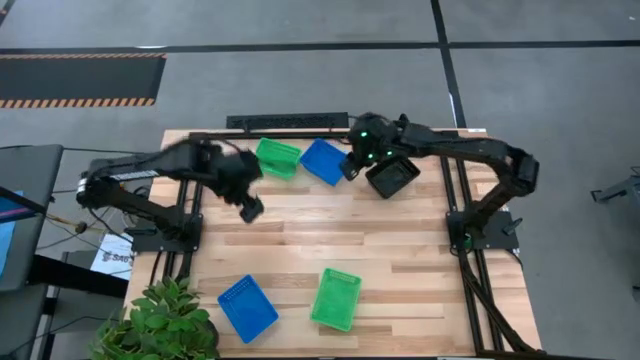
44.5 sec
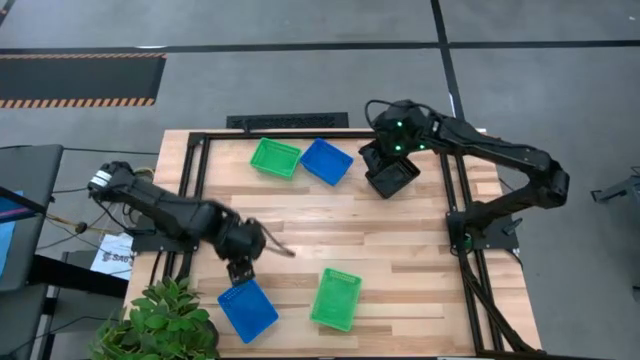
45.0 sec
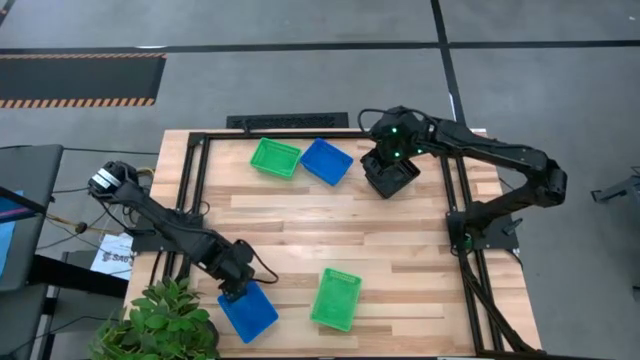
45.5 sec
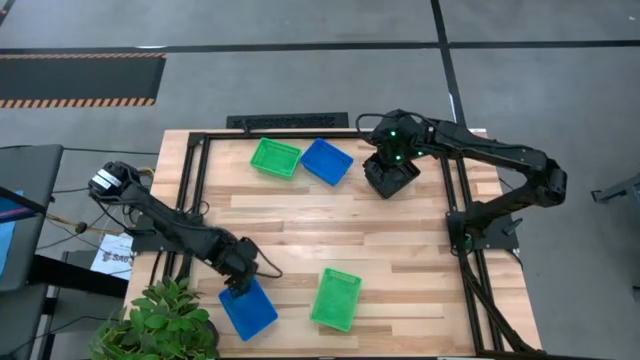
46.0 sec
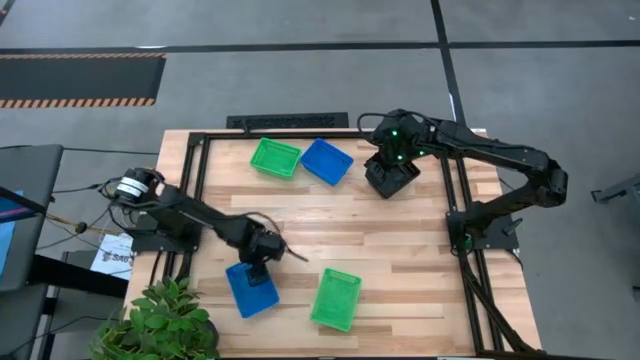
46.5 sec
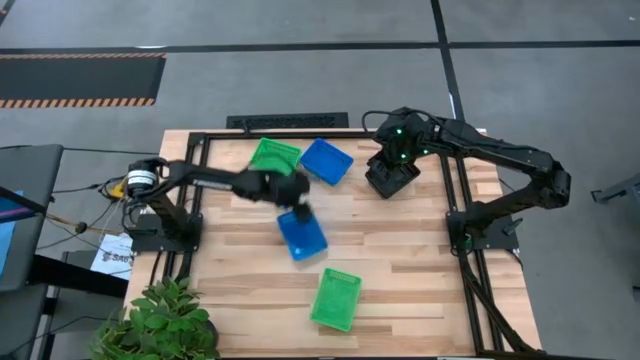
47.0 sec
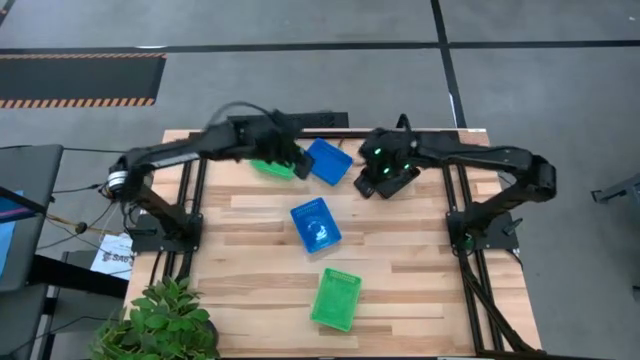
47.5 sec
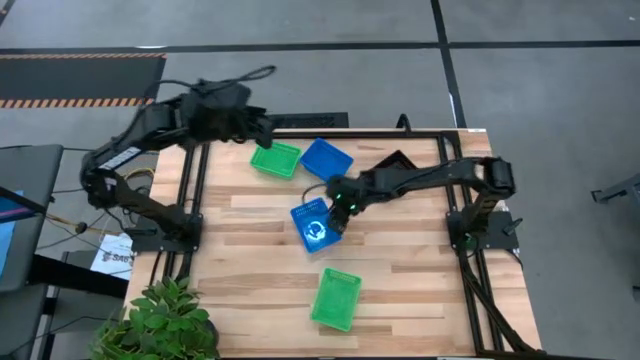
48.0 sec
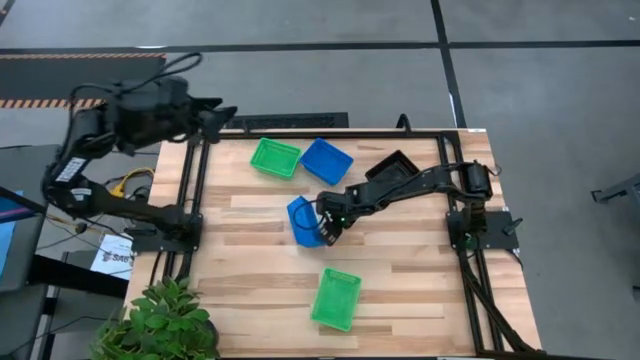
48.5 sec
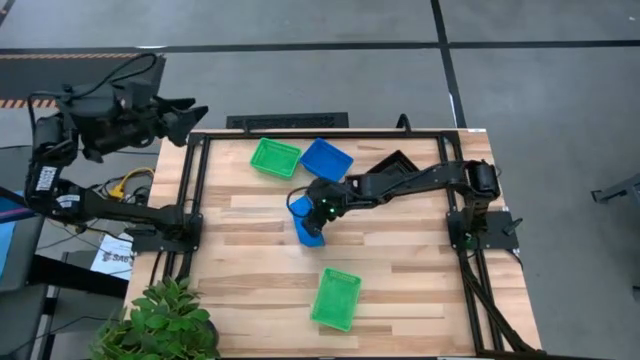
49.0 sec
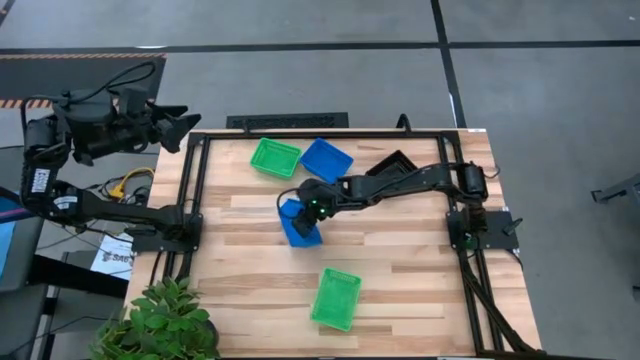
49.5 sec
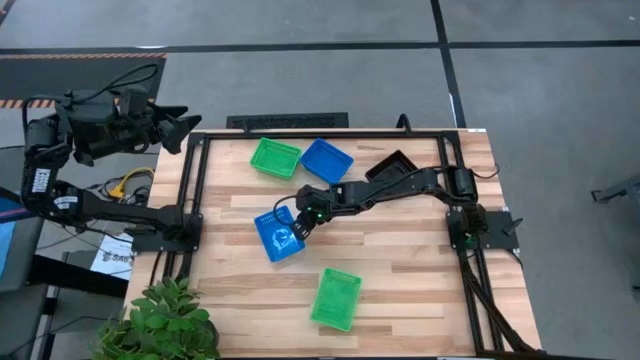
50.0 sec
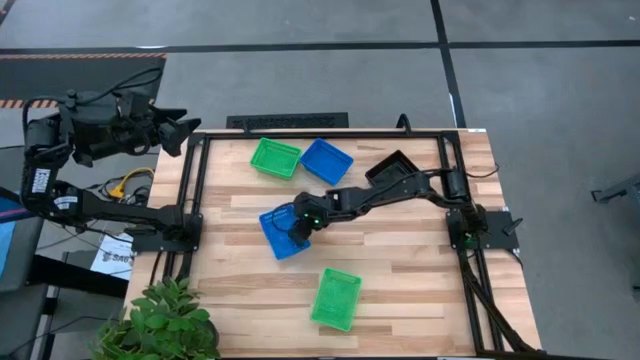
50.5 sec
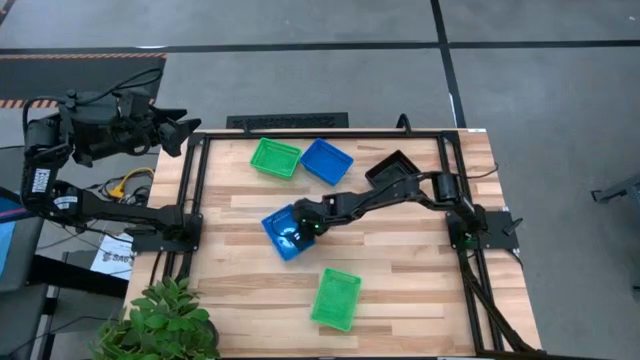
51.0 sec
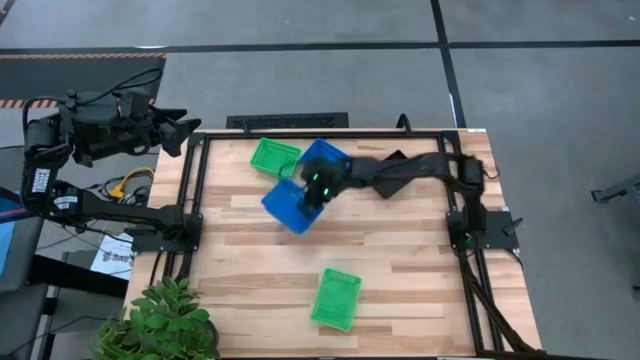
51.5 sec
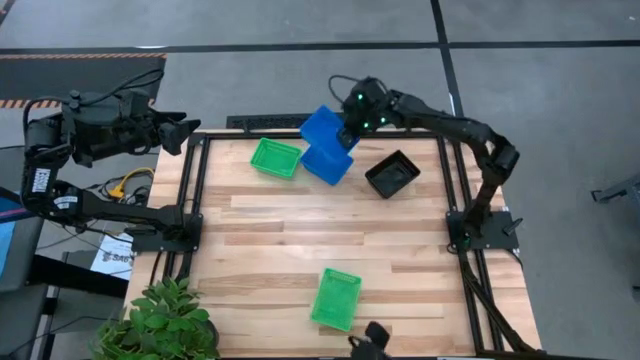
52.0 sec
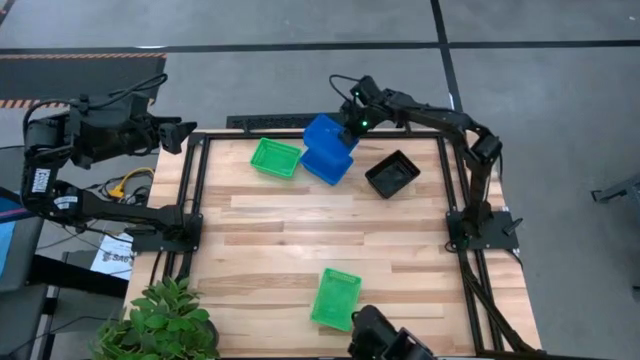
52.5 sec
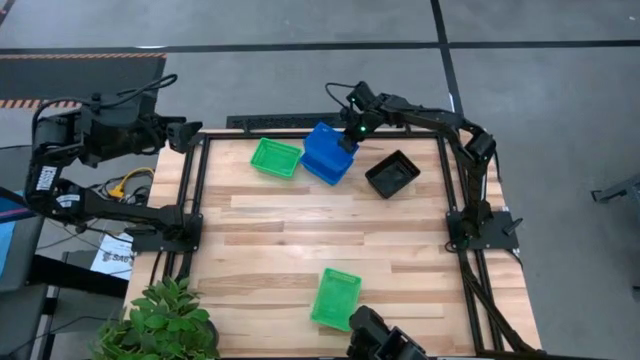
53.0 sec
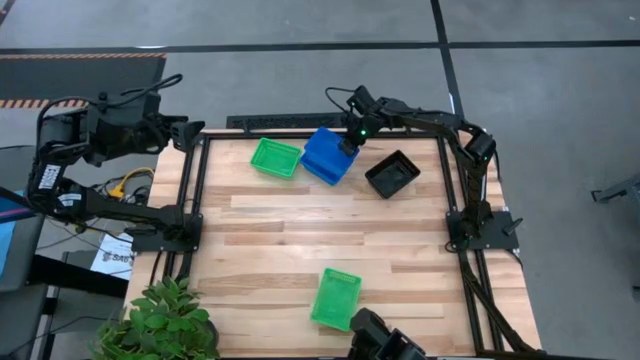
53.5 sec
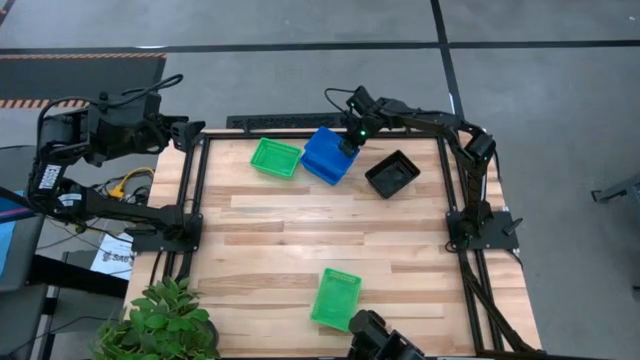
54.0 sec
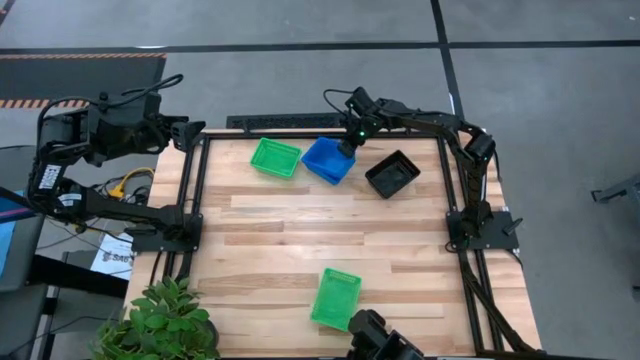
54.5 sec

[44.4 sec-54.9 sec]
Stack the bottom blue bin on the top blue bins

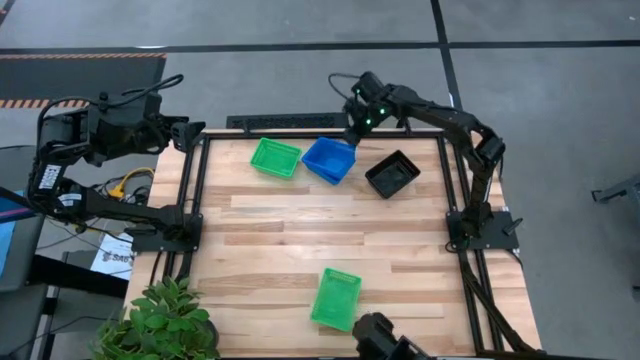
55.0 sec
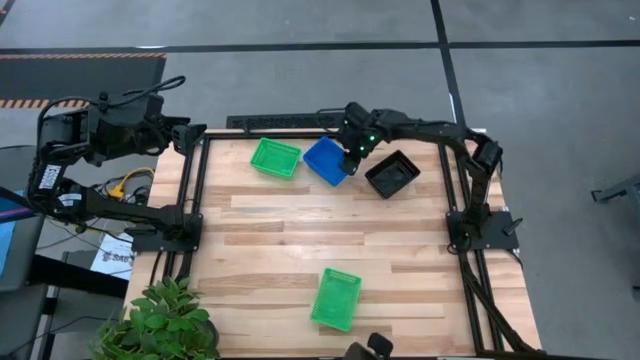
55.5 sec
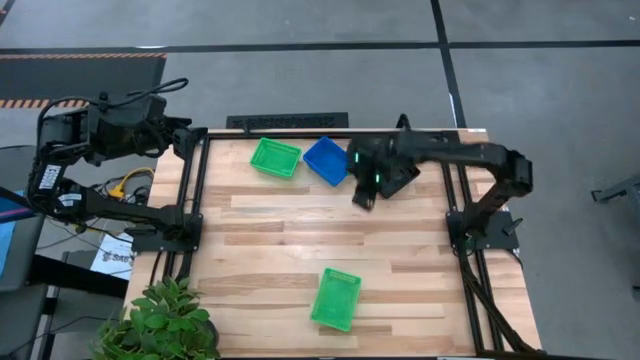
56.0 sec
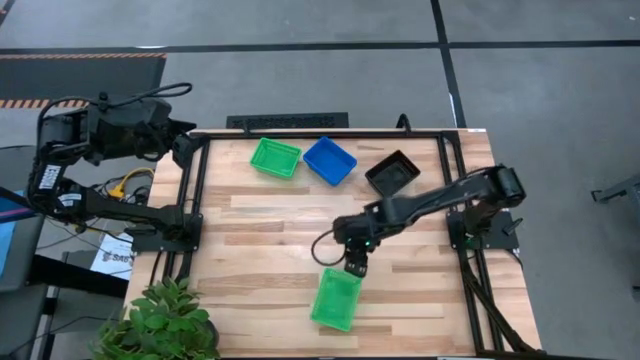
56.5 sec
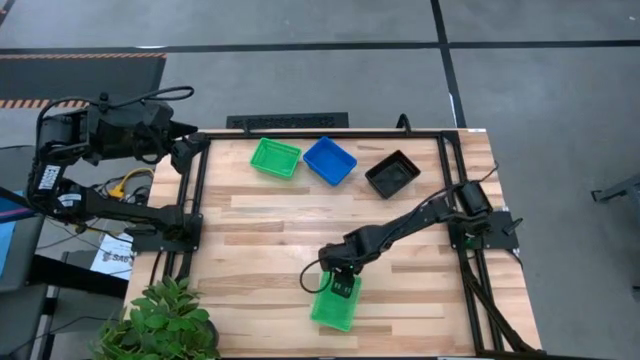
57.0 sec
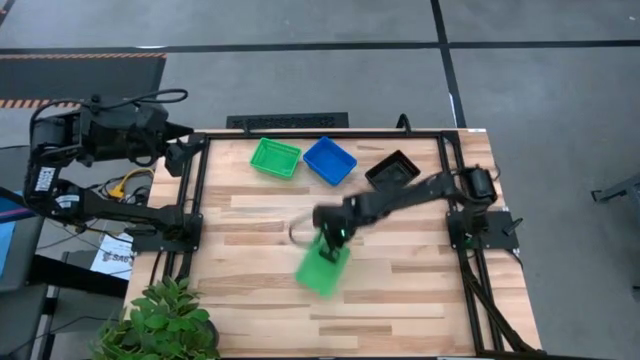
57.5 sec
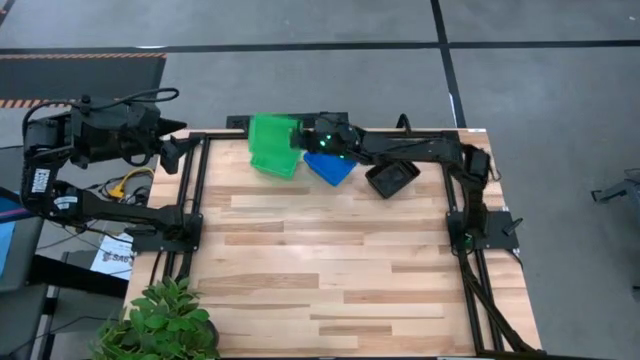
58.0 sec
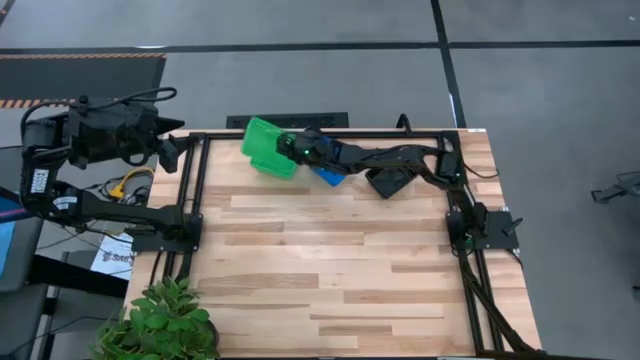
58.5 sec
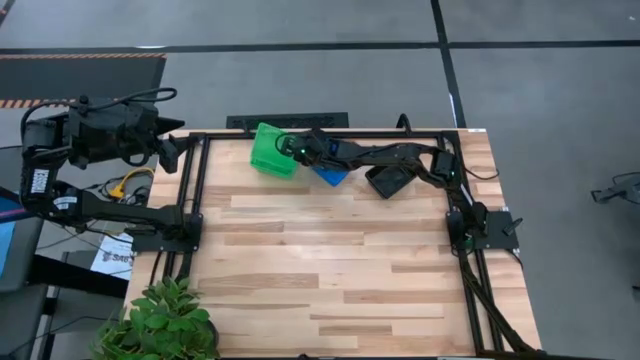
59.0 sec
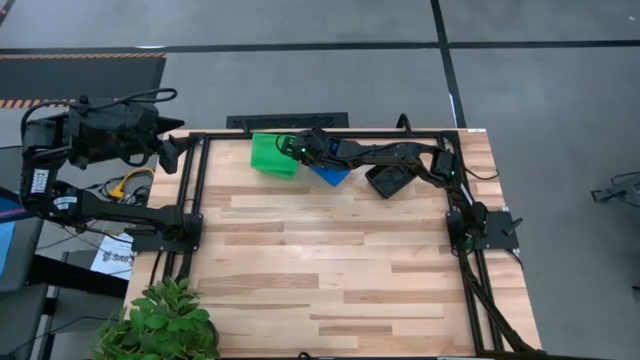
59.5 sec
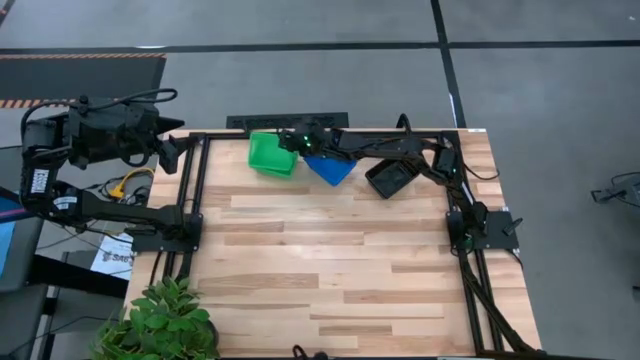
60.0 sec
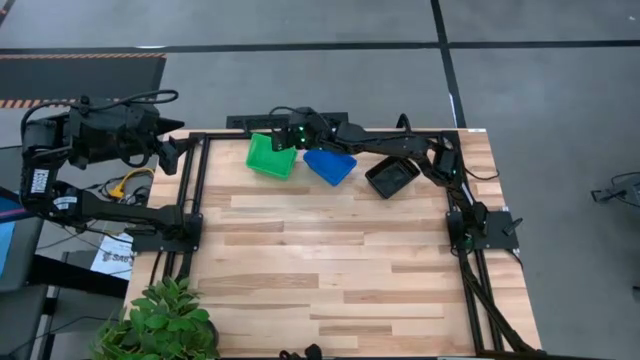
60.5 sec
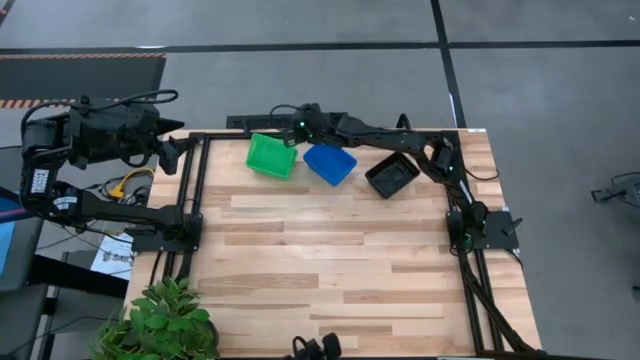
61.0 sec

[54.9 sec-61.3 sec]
Stack the bottom green bin on the top green bin
